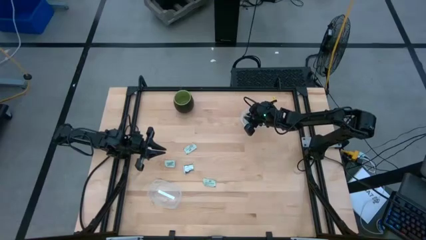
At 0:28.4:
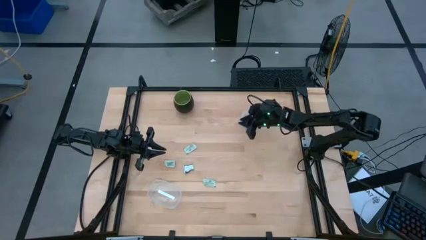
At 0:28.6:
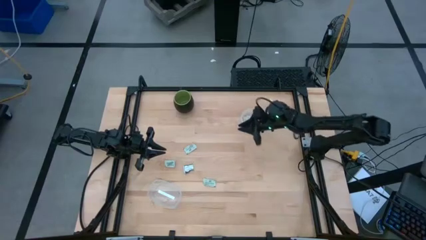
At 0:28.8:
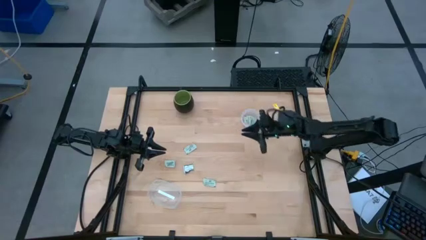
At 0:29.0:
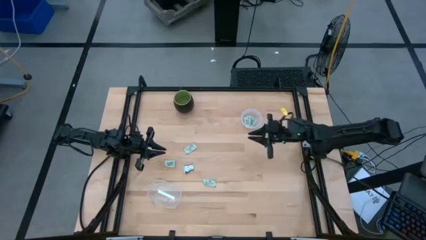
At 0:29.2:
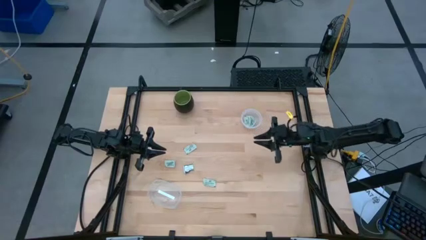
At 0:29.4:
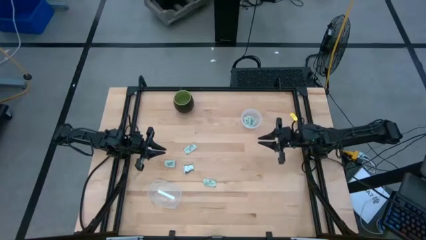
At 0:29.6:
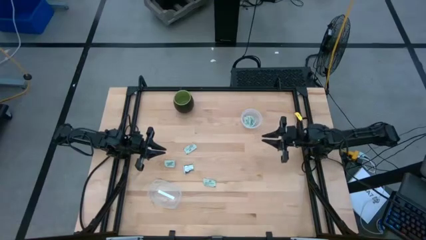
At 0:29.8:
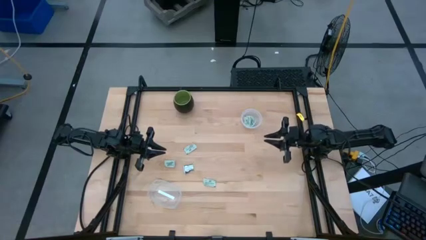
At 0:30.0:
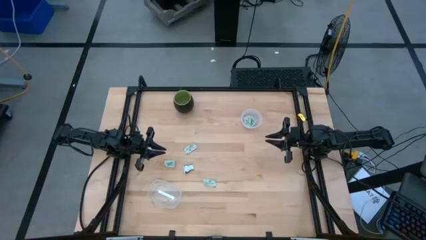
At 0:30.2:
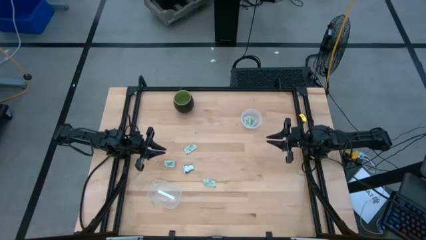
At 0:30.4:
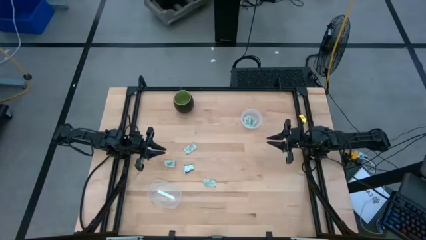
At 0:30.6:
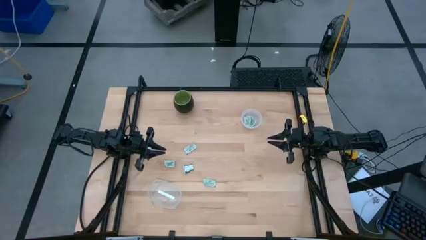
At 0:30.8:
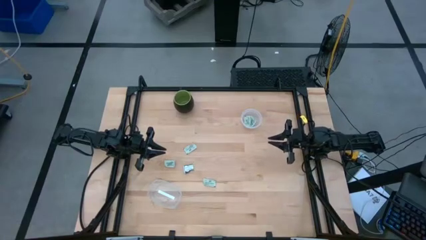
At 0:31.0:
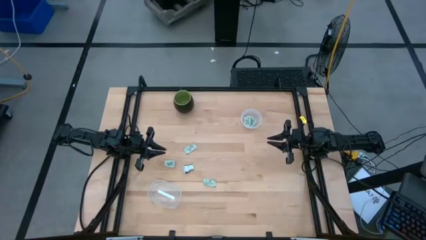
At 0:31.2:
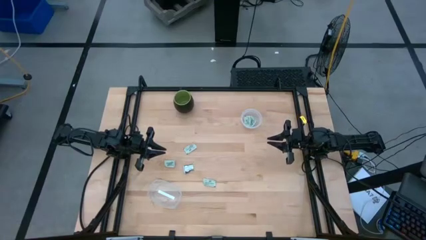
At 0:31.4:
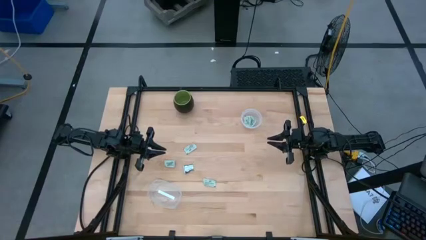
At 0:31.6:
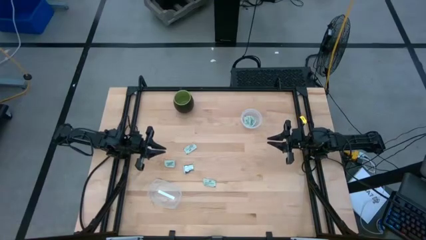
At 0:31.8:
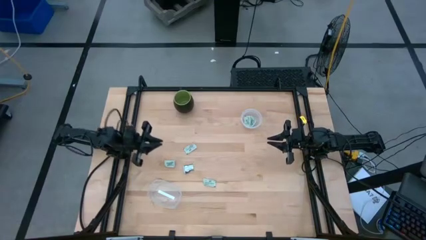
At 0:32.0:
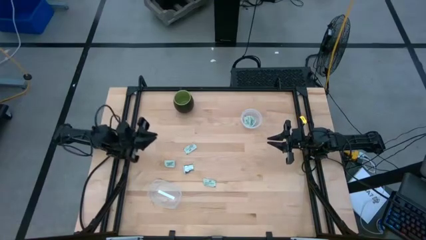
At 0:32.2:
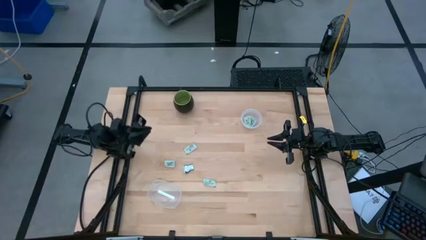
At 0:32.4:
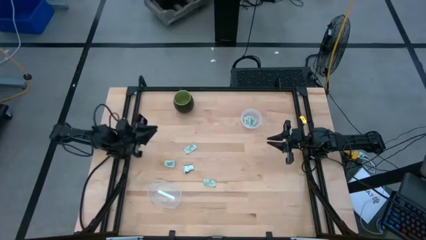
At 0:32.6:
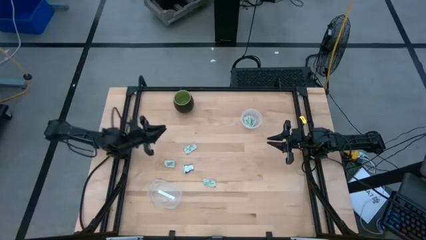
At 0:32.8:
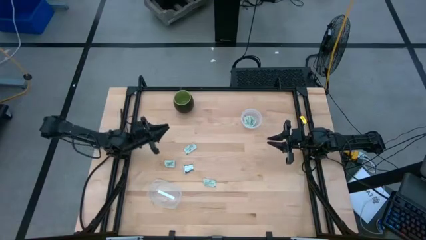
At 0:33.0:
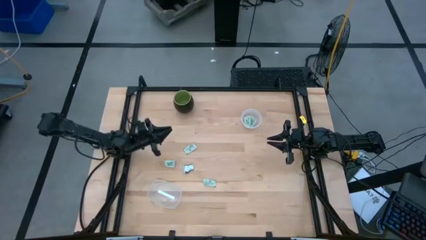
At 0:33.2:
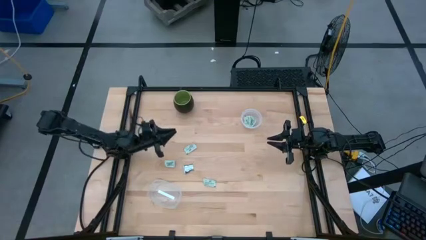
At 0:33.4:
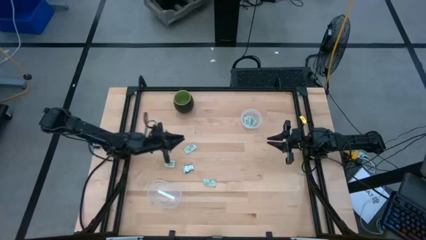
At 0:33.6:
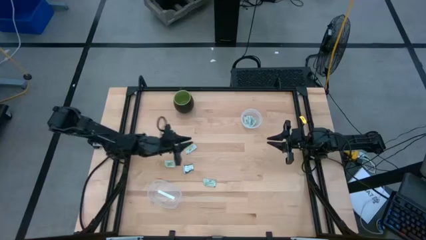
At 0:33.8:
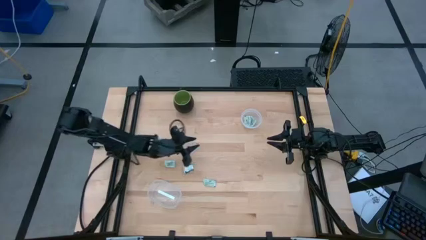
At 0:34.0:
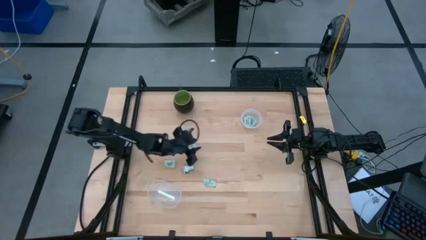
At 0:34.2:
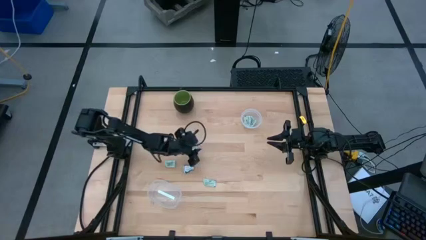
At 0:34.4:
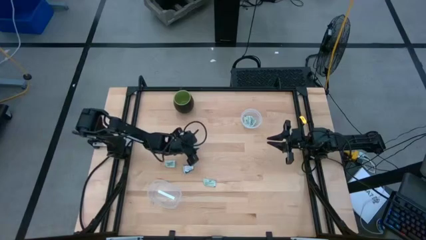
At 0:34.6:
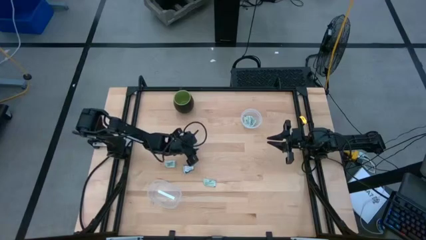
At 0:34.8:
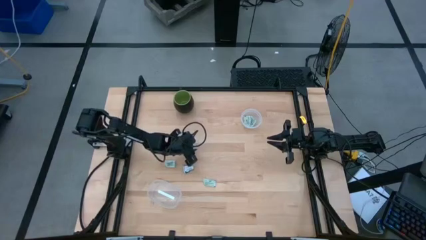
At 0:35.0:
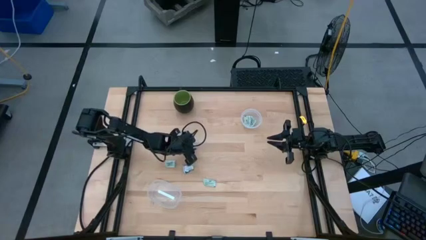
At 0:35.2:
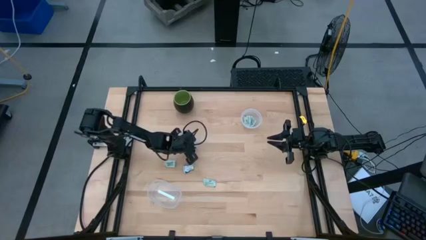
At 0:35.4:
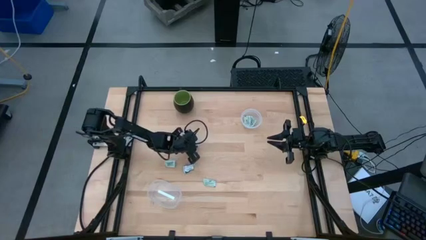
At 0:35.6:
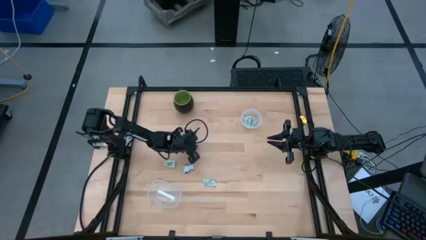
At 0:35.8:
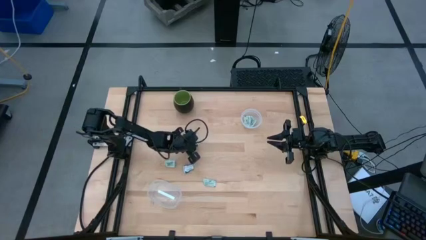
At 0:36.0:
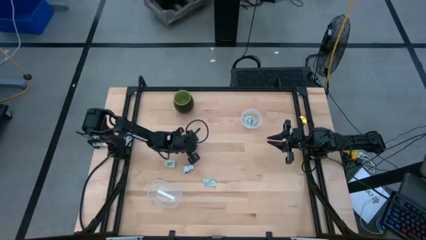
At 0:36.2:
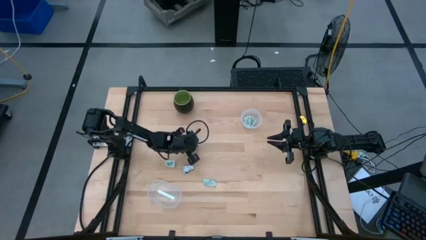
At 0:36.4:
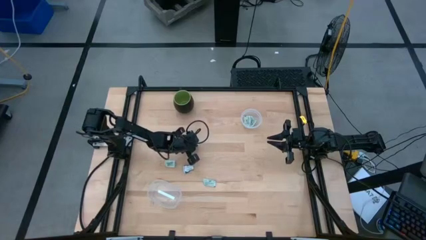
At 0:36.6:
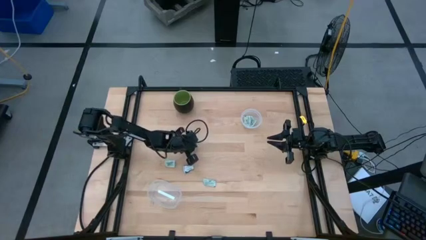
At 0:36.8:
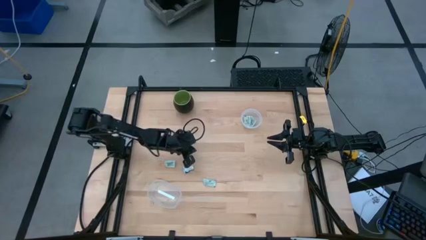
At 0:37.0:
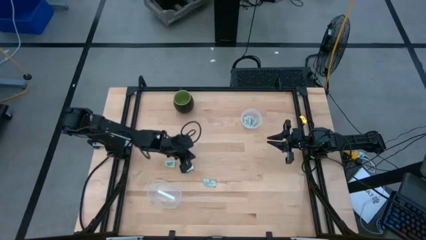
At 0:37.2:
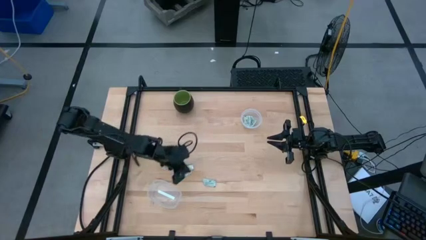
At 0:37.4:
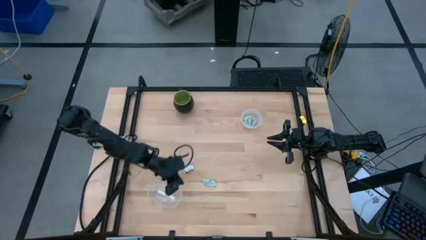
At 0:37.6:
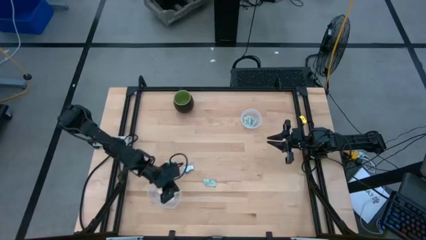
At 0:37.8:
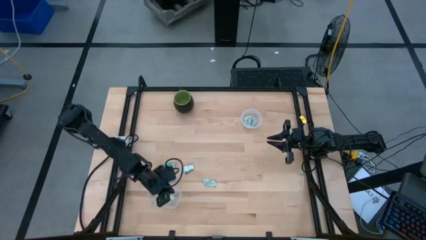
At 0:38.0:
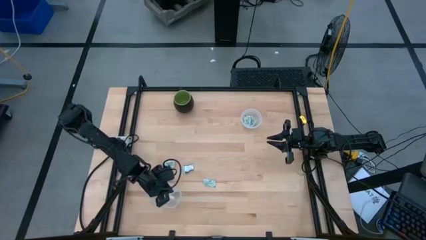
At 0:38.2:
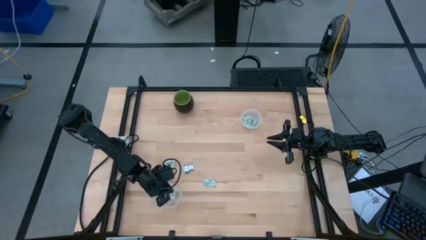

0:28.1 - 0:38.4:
Task: Pick and place items into bin
Put the green stevia packet into the bottom transparent bin

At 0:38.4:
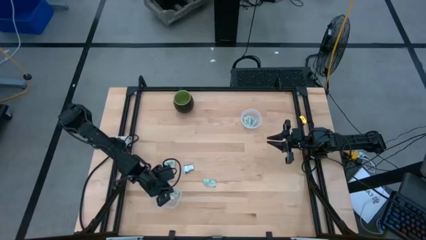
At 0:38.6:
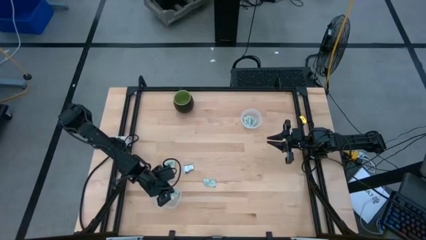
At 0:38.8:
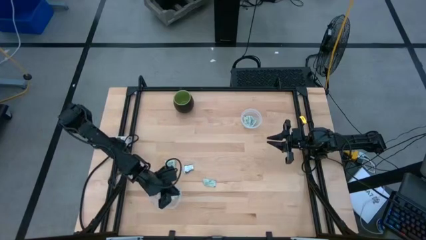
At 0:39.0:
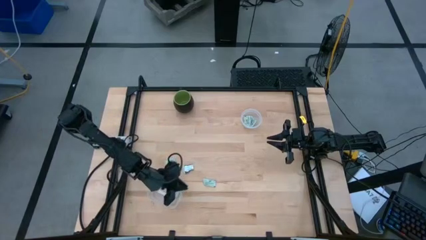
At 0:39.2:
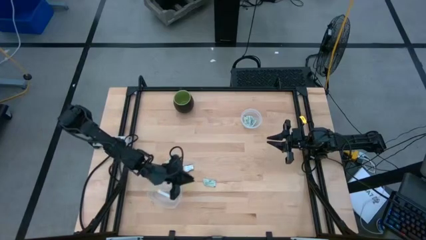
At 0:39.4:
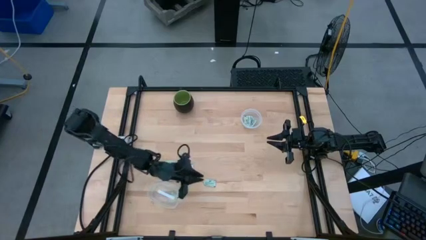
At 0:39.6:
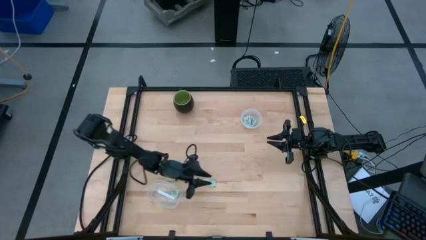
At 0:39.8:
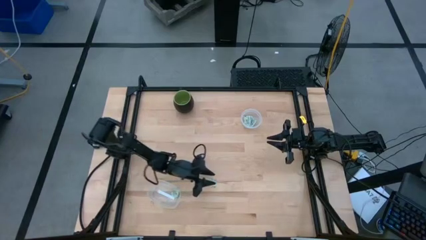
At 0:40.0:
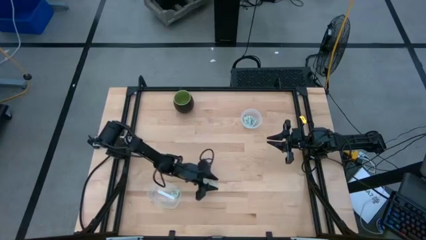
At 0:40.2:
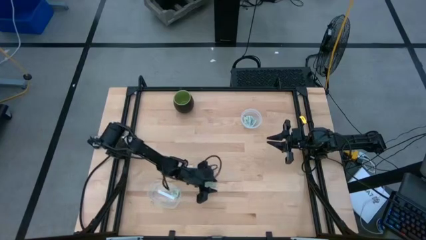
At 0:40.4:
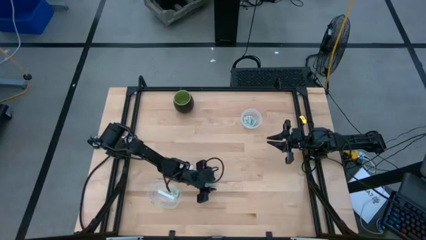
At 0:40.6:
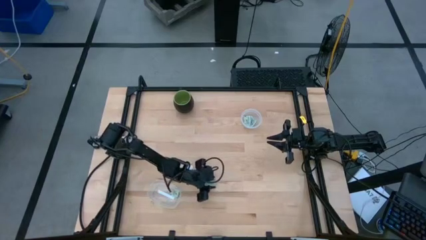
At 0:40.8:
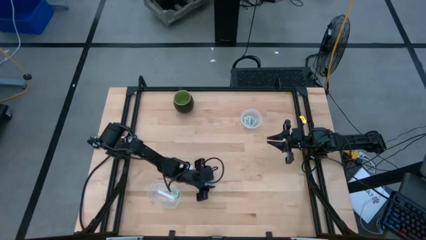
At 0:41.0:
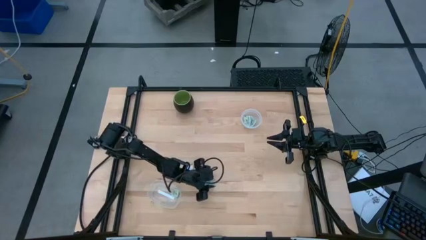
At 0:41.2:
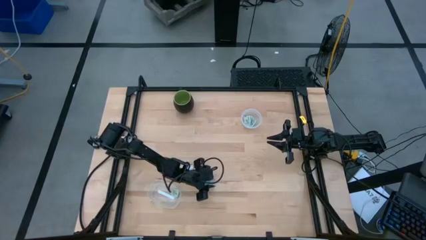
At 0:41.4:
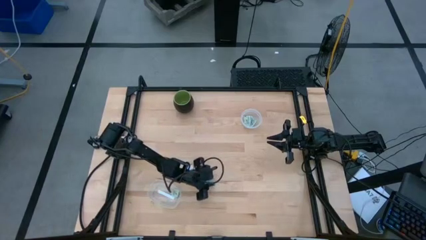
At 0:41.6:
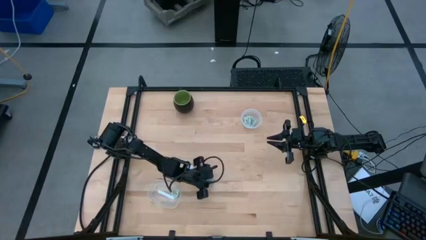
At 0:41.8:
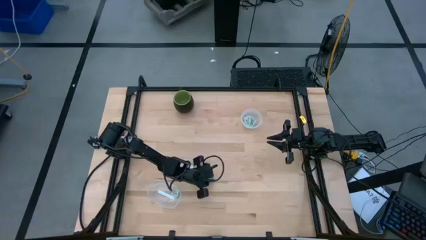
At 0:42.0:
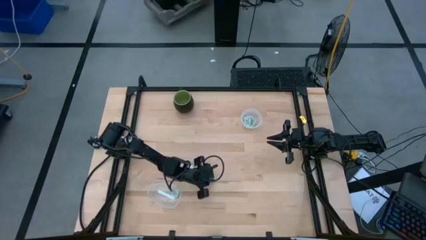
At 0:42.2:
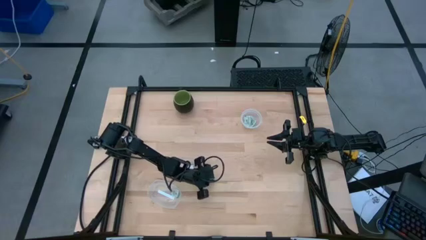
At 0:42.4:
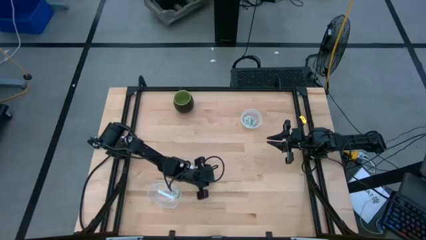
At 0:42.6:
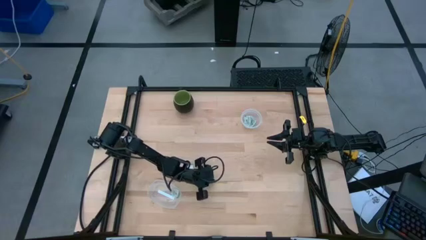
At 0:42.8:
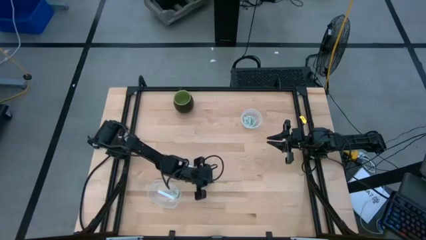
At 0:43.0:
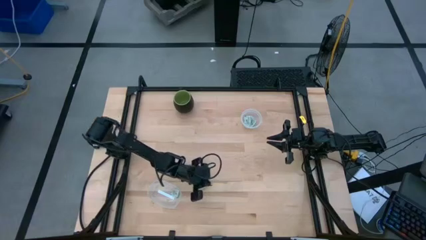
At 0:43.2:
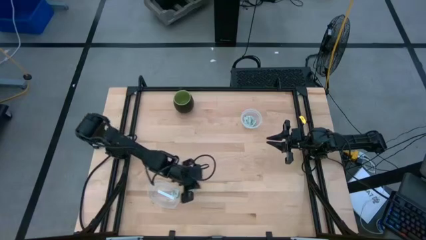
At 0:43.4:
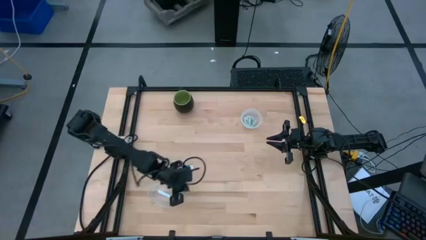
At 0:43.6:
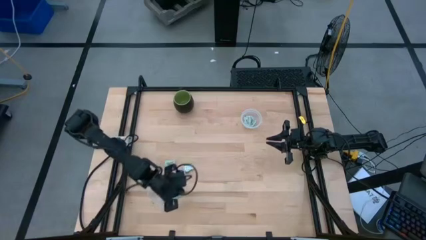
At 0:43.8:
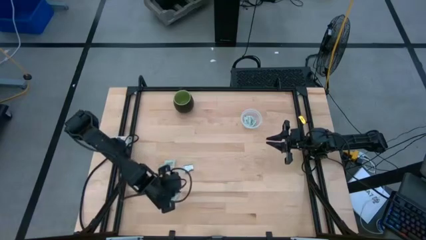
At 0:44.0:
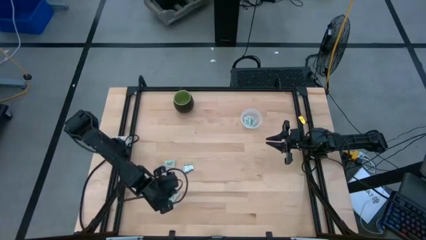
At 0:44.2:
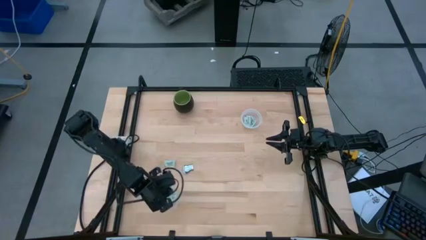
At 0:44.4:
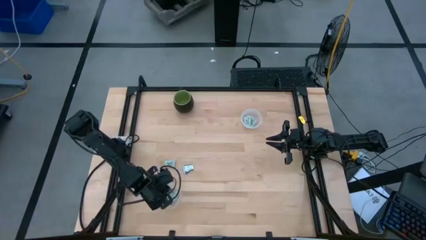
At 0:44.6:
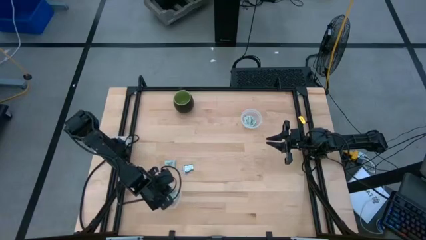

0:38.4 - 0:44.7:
Put the green stevia packet into the bottom transparent bin
